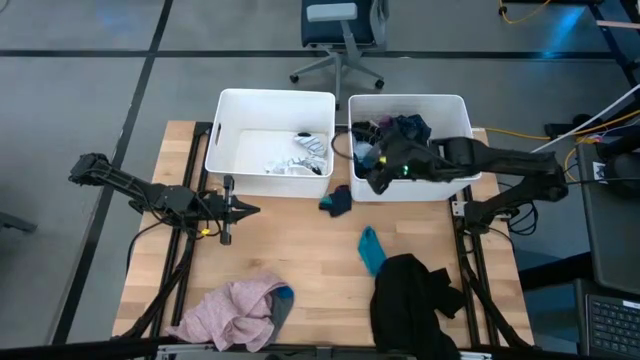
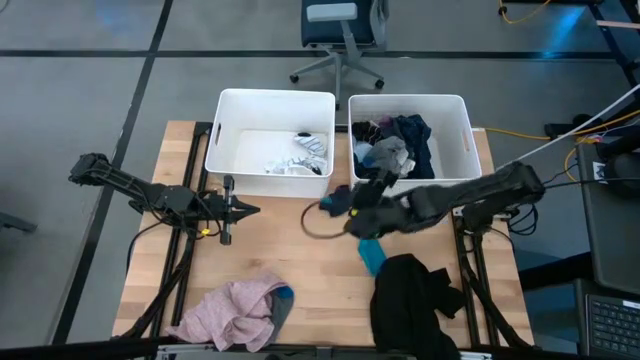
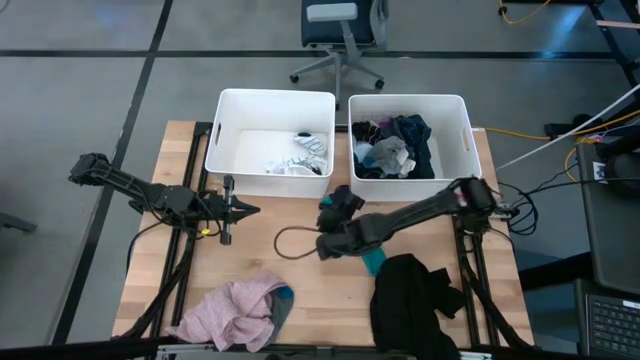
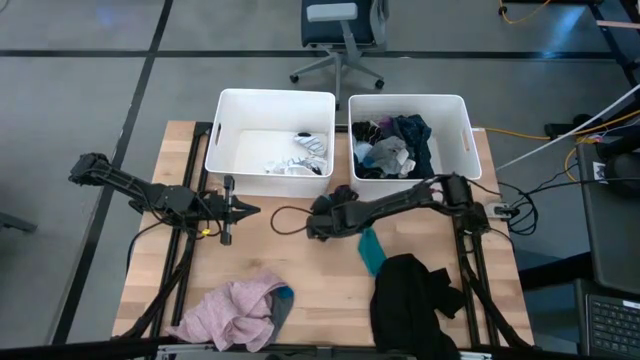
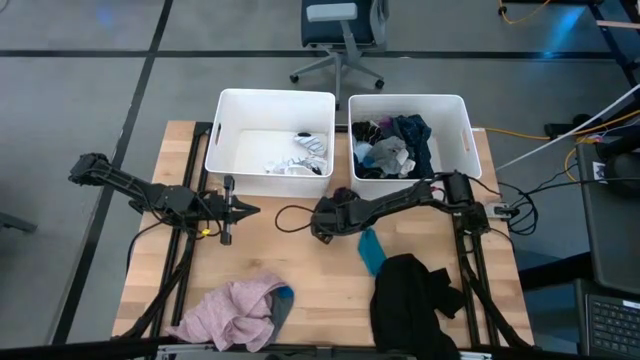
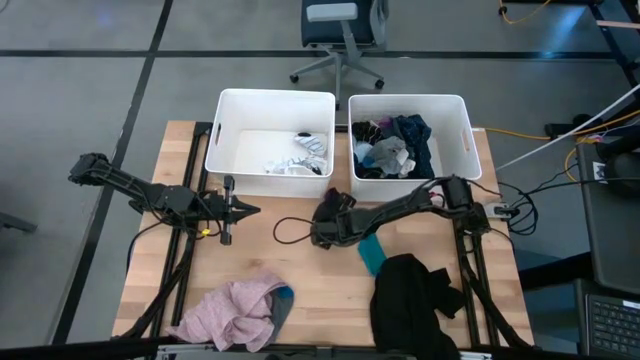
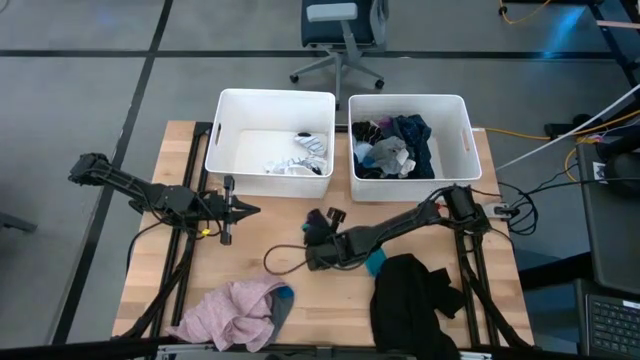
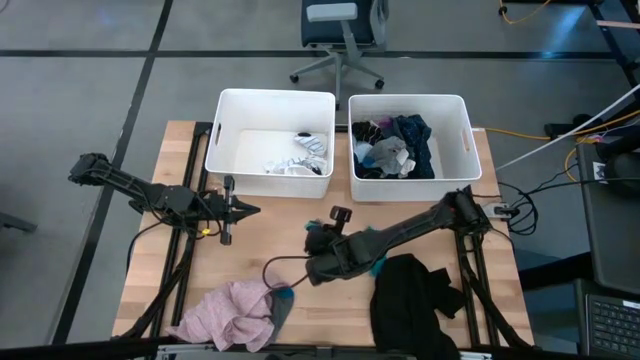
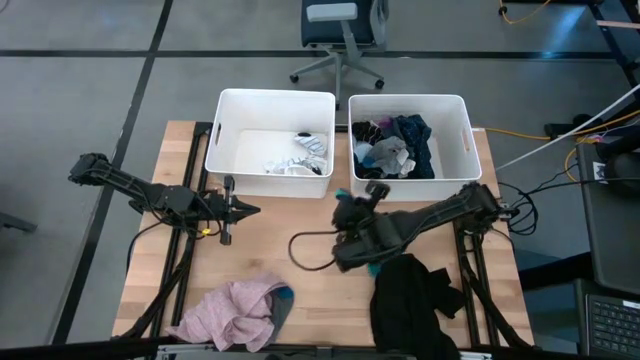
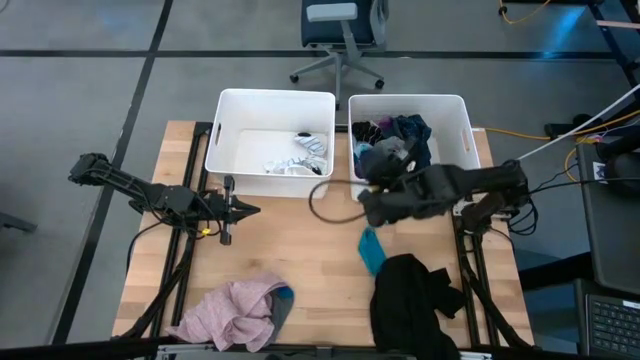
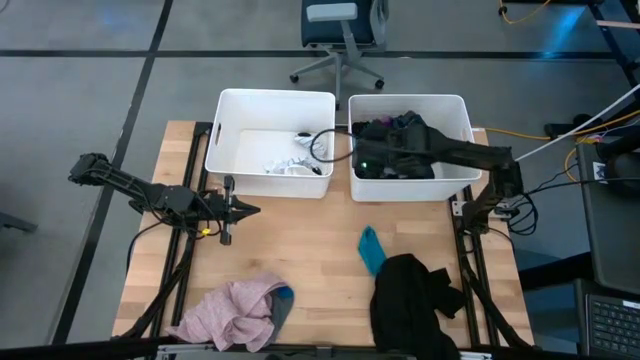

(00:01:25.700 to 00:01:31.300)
Task: Sort clothes
Put the dark blue sock into the right white bin

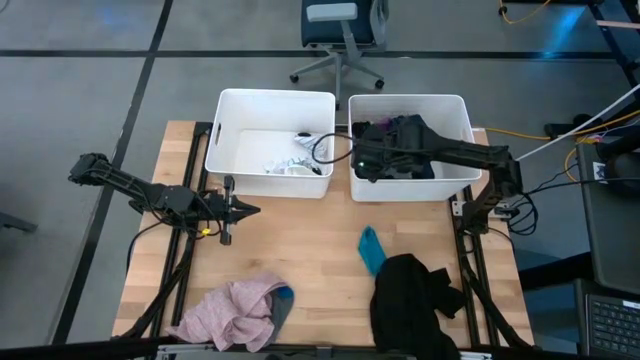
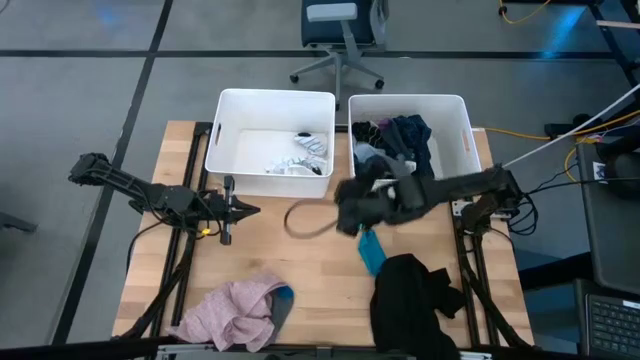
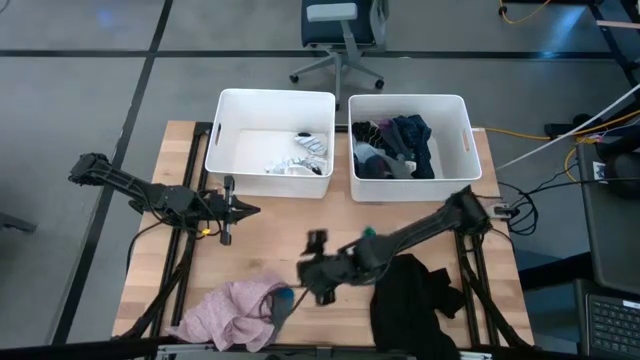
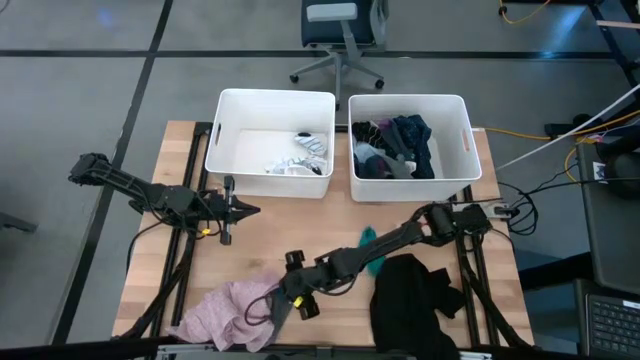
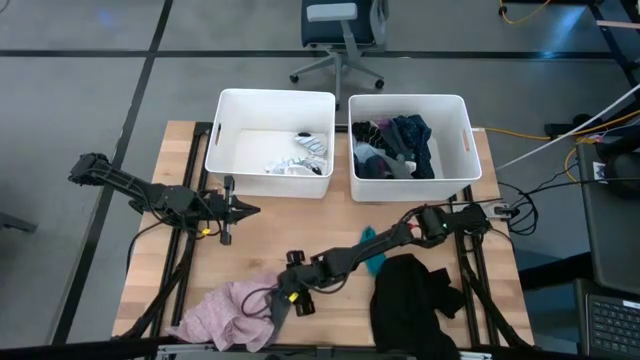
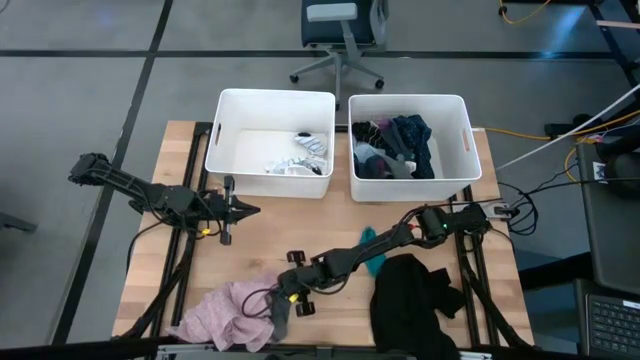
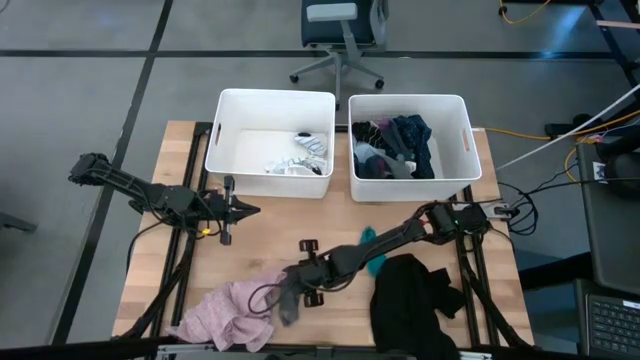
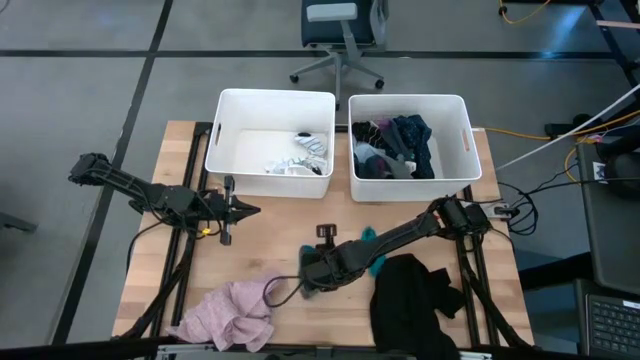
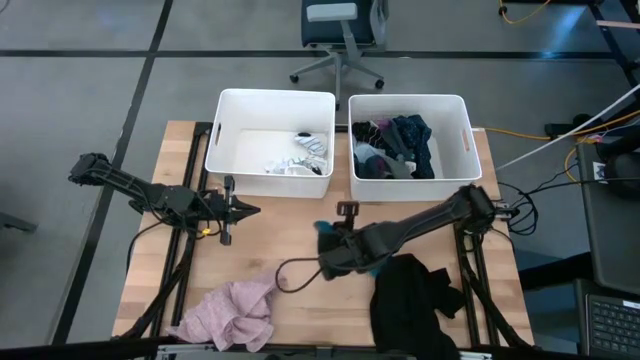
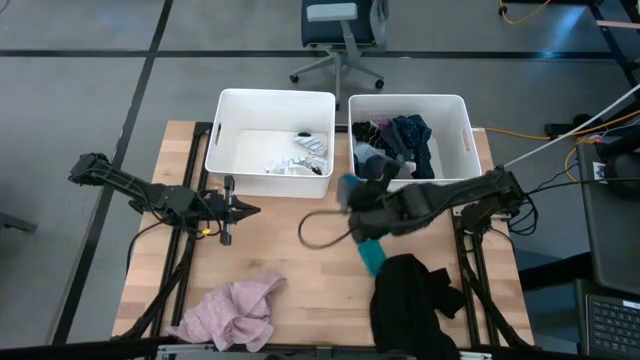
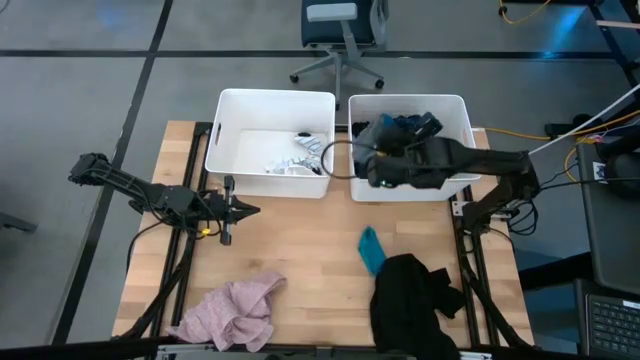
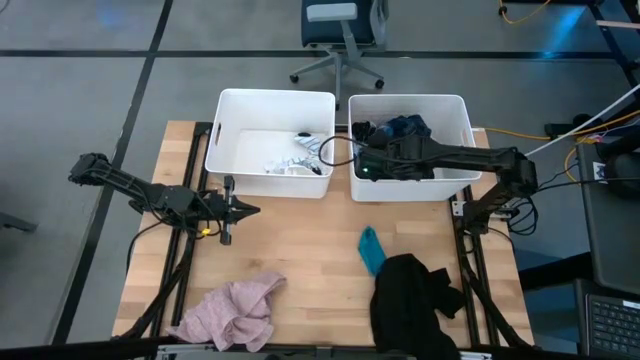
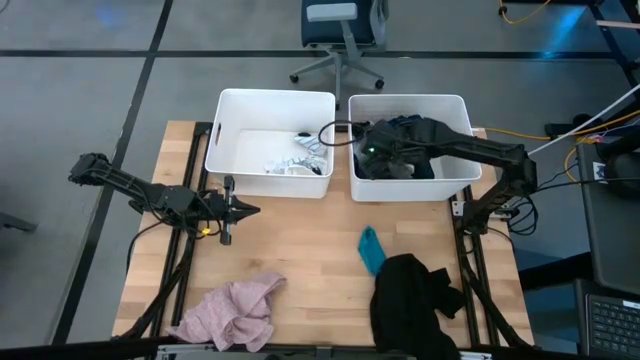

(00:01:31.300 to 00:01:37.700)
Put the gray sock into the right white bin

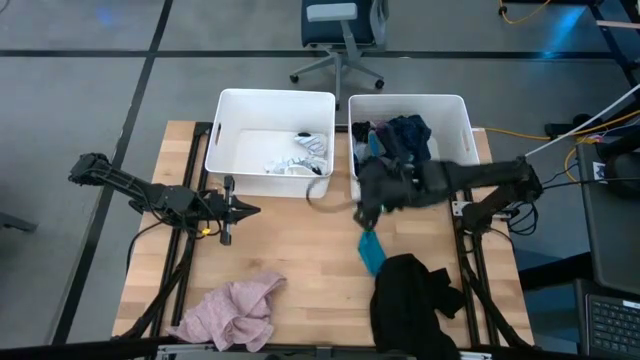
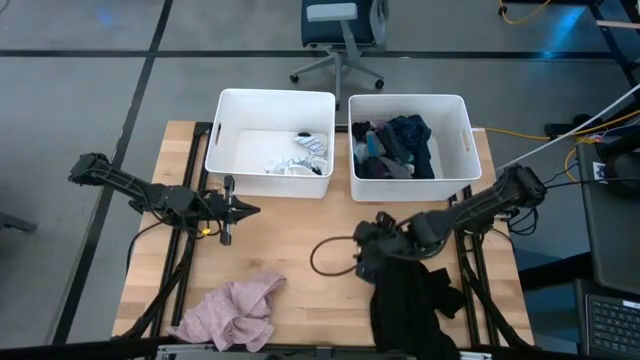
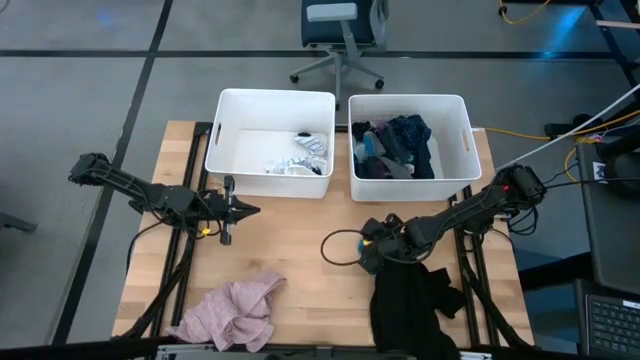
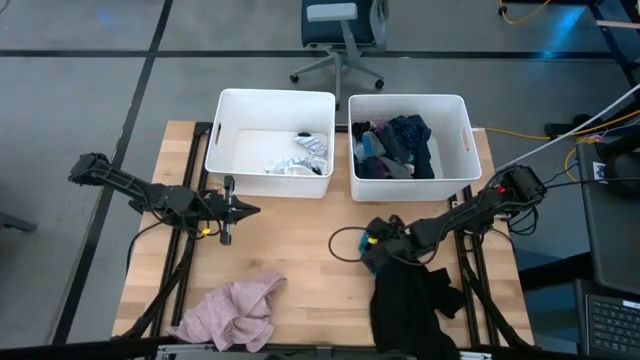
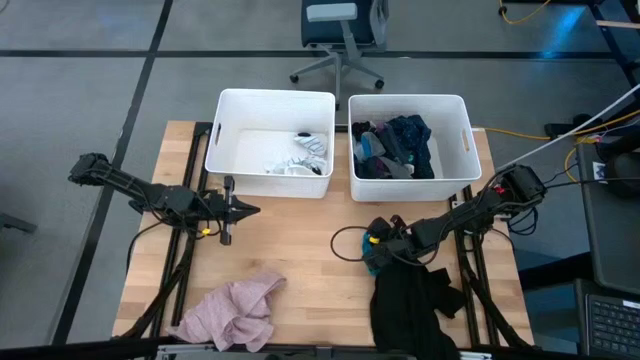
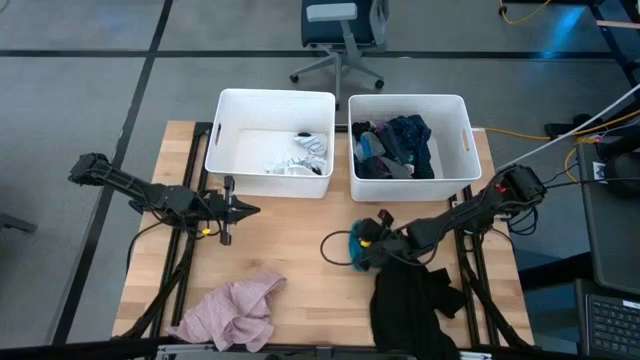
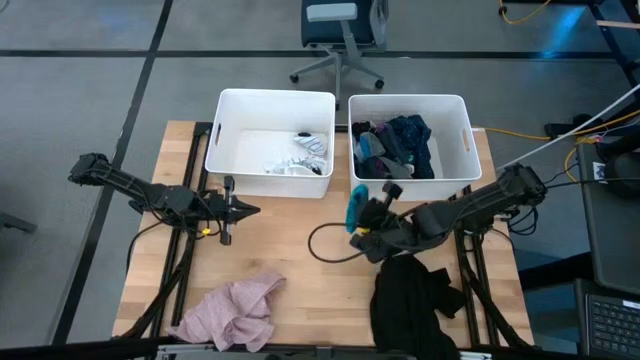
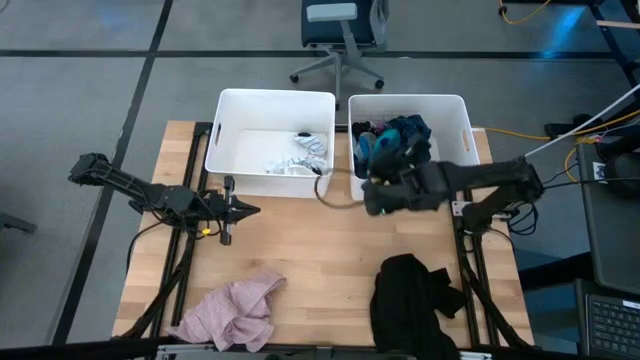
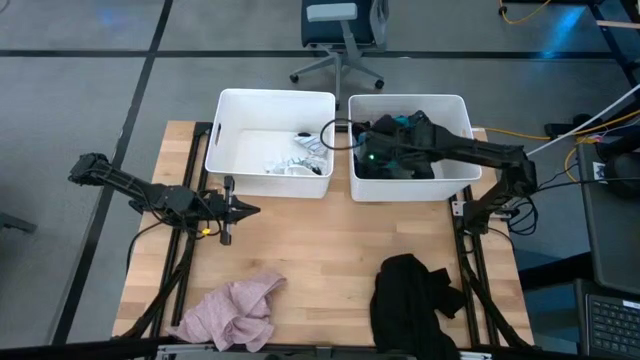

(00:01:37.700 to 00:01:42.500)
Put the blue sock into the right white bin

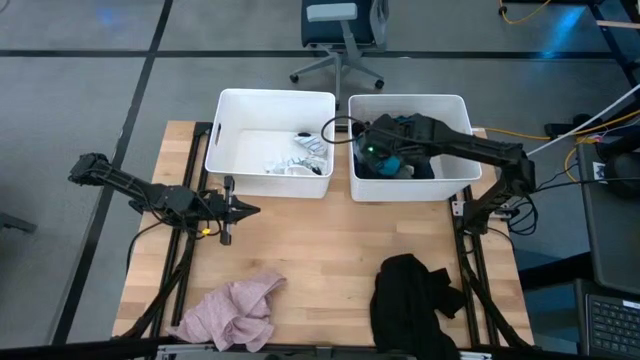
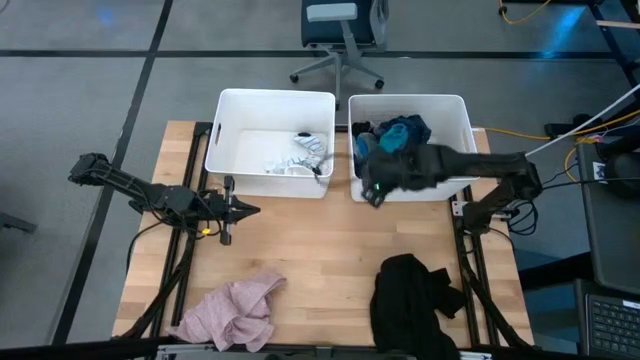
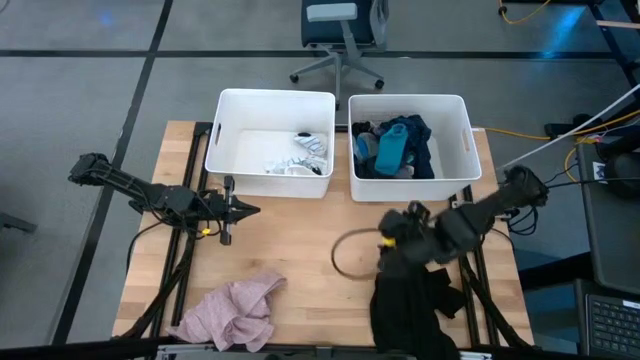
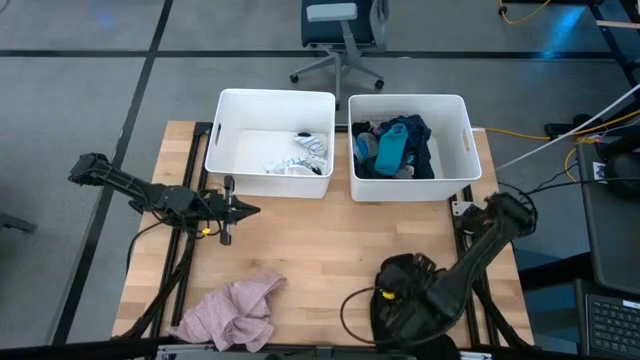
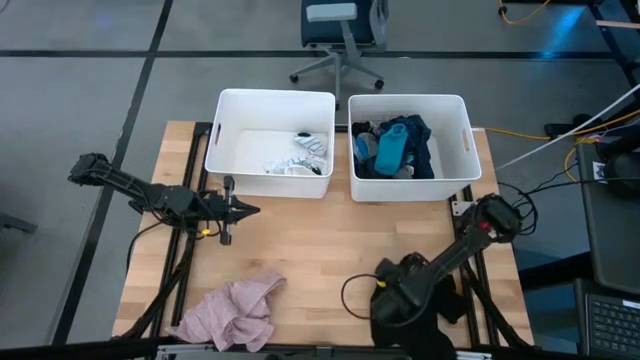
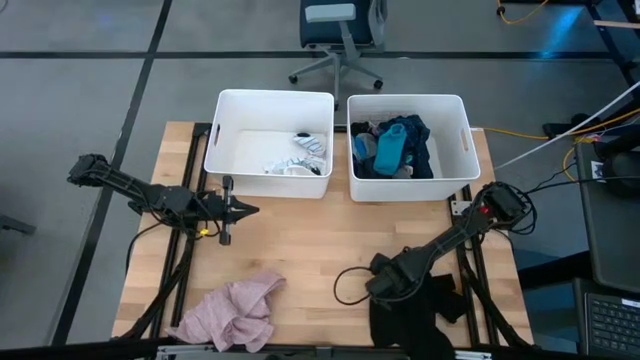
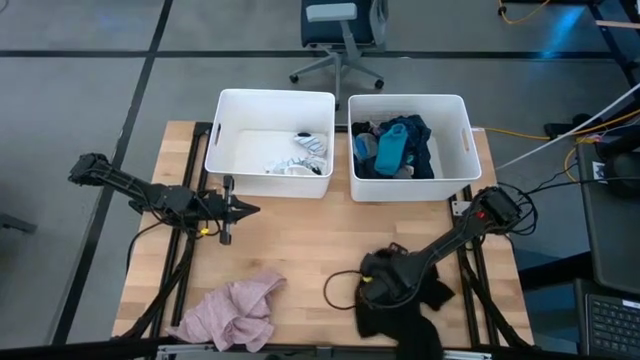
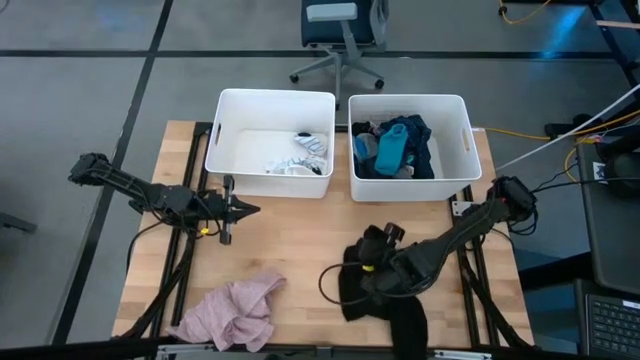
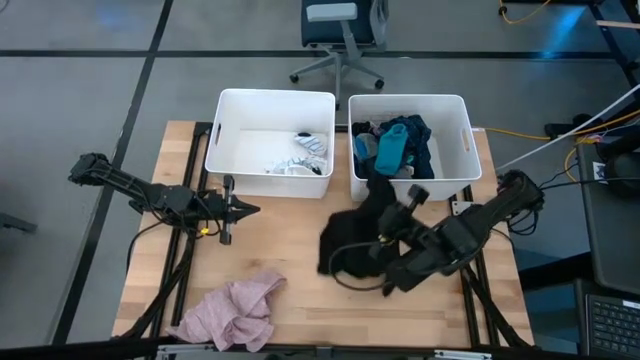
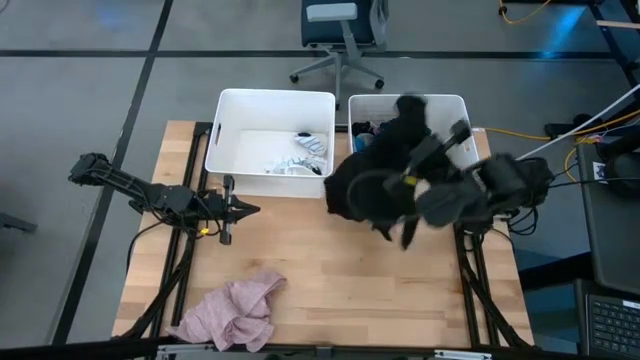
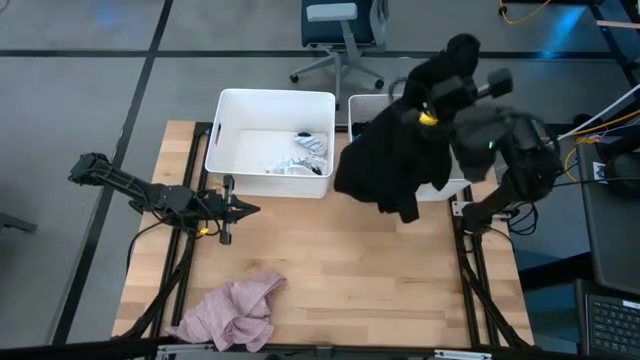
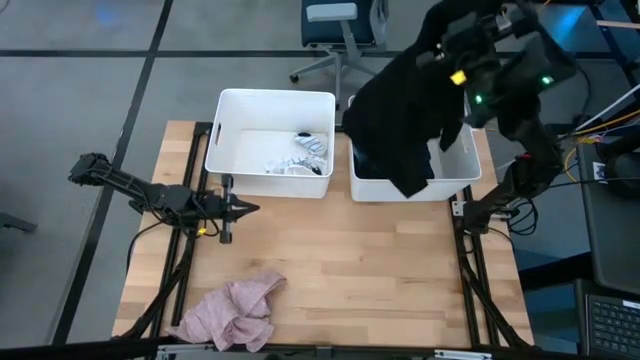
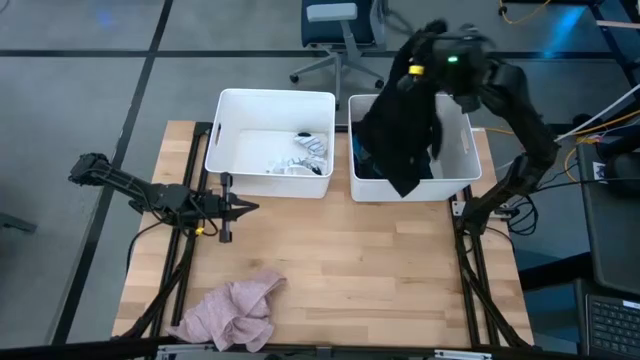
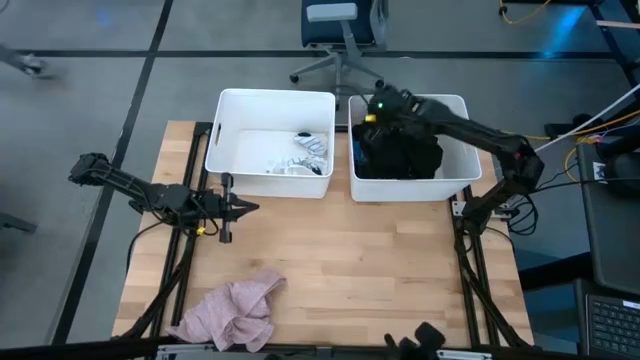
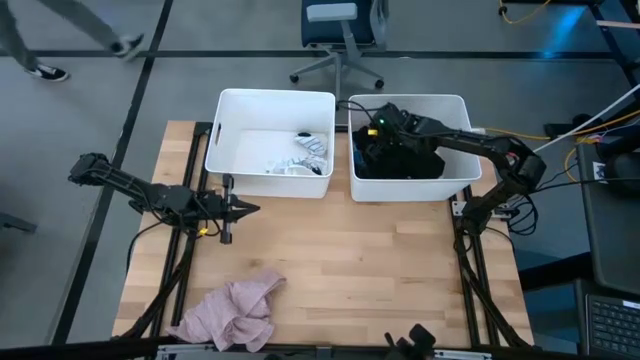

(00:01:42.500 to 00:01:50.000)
Put the black shirt into the right white bin
